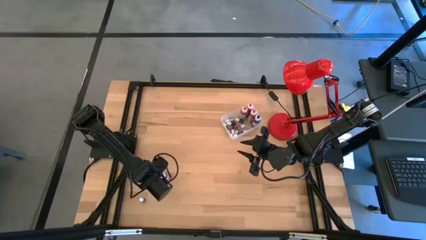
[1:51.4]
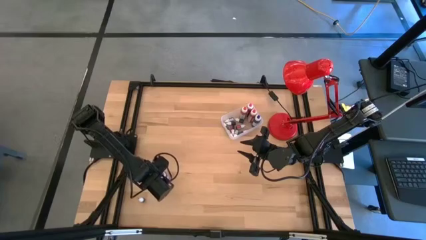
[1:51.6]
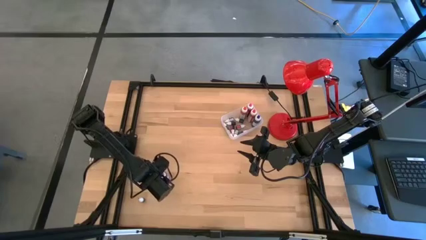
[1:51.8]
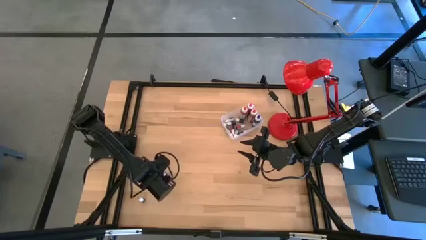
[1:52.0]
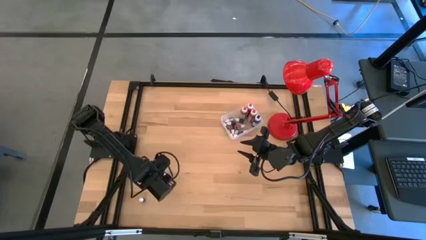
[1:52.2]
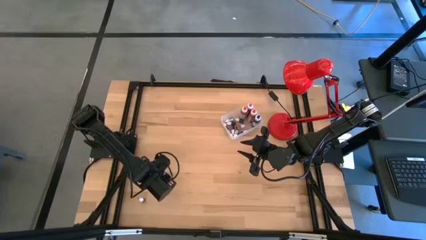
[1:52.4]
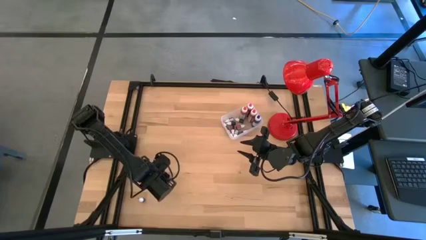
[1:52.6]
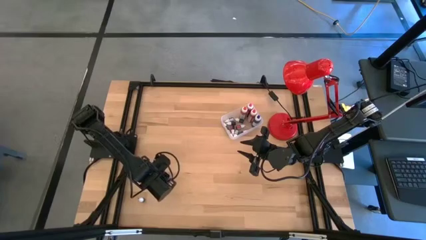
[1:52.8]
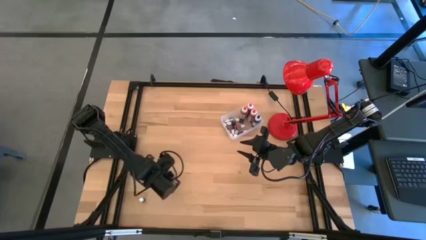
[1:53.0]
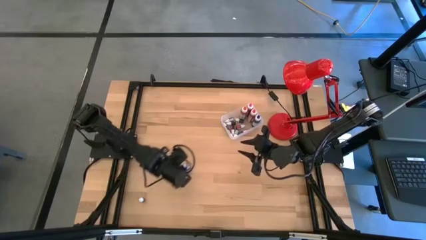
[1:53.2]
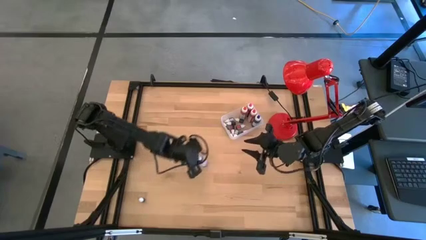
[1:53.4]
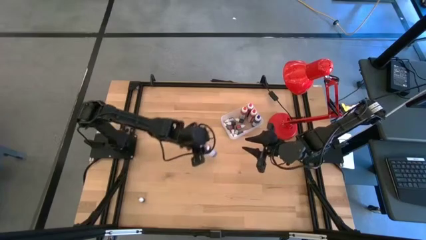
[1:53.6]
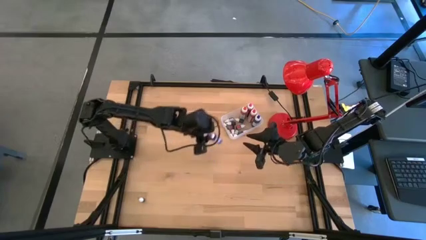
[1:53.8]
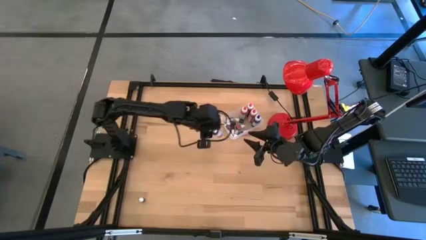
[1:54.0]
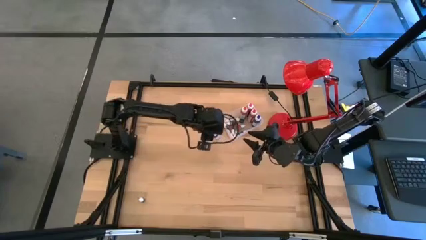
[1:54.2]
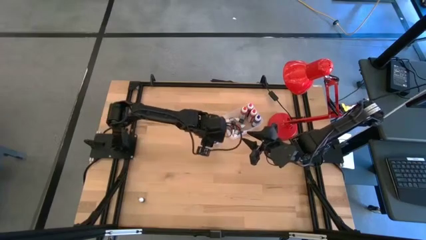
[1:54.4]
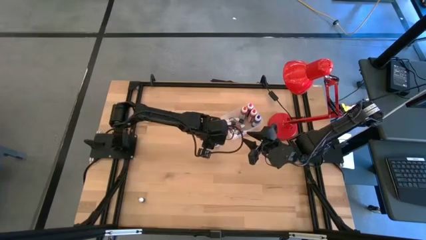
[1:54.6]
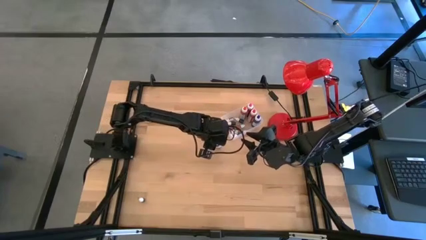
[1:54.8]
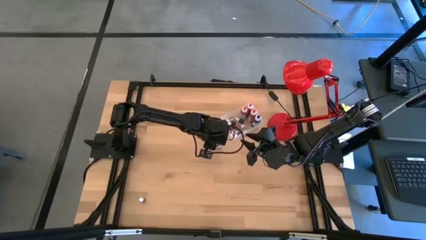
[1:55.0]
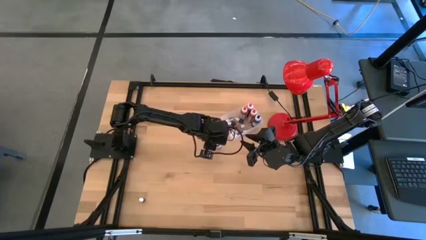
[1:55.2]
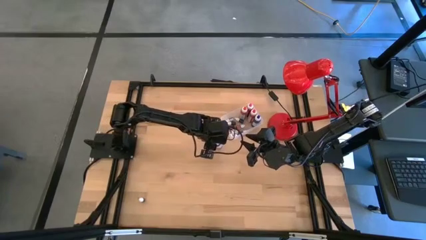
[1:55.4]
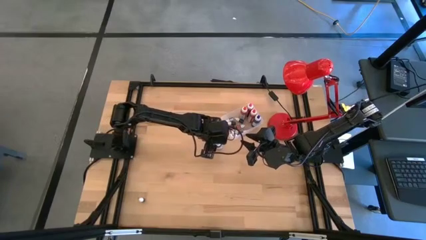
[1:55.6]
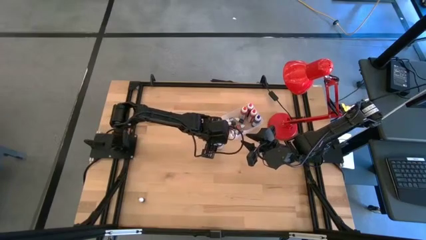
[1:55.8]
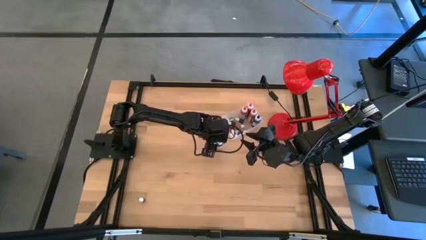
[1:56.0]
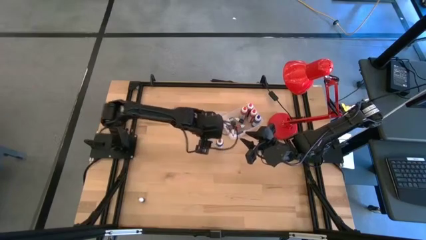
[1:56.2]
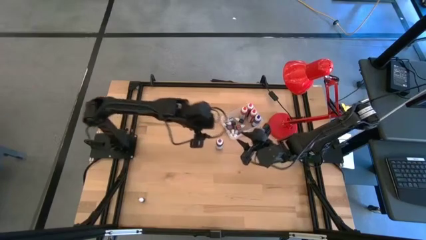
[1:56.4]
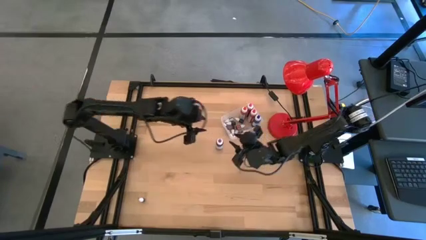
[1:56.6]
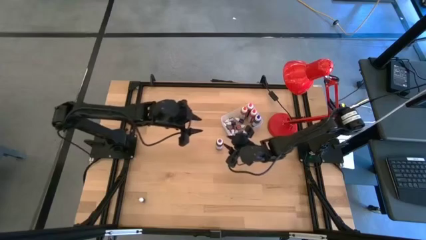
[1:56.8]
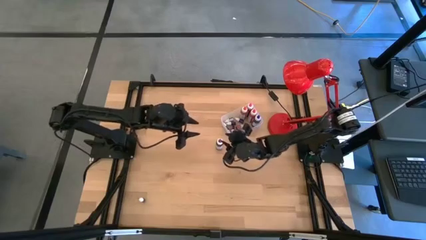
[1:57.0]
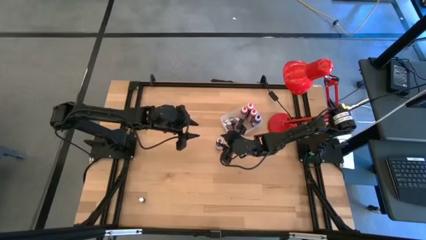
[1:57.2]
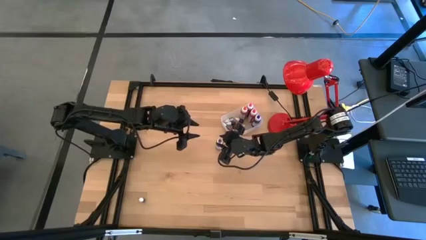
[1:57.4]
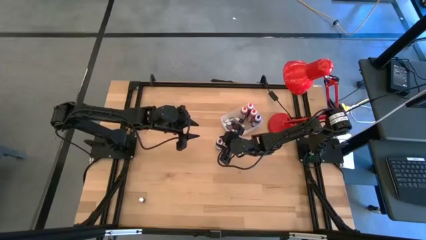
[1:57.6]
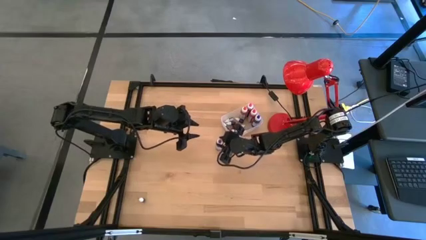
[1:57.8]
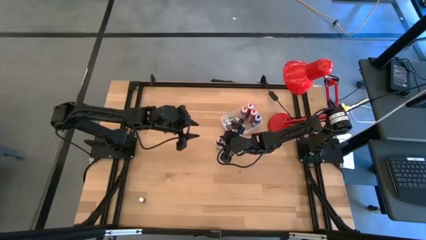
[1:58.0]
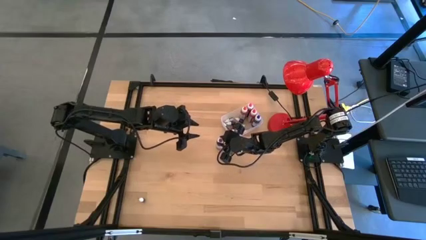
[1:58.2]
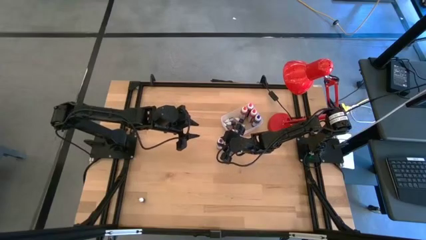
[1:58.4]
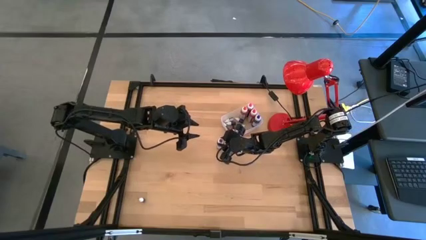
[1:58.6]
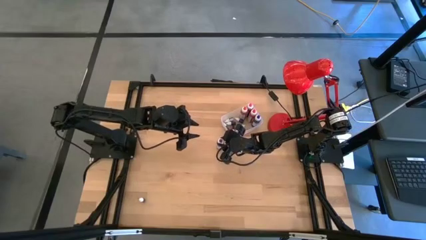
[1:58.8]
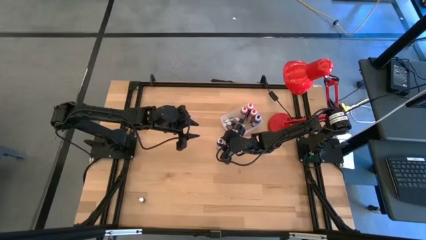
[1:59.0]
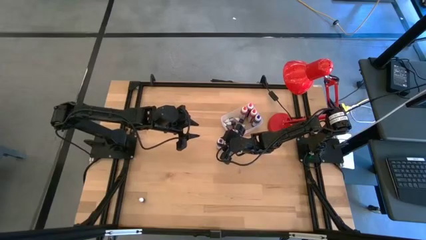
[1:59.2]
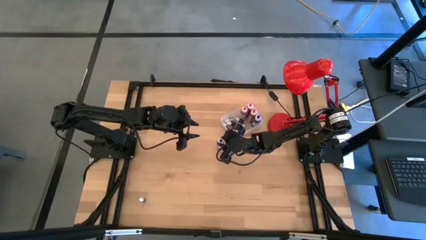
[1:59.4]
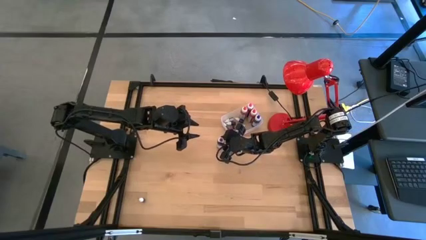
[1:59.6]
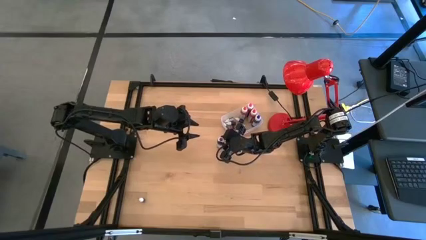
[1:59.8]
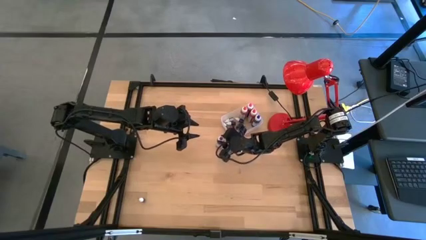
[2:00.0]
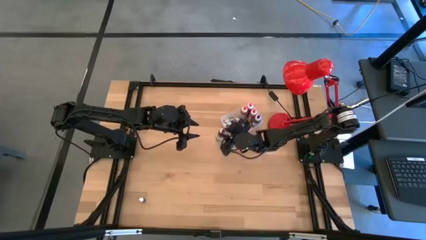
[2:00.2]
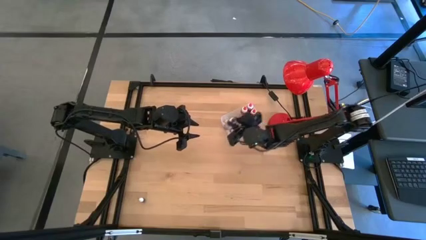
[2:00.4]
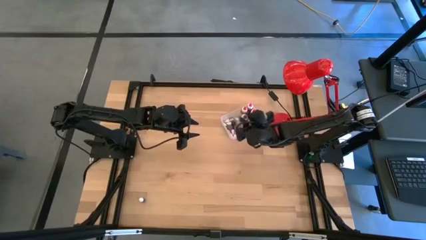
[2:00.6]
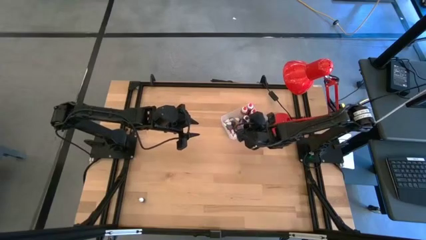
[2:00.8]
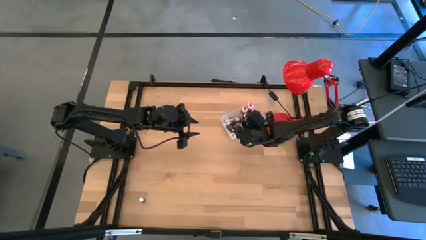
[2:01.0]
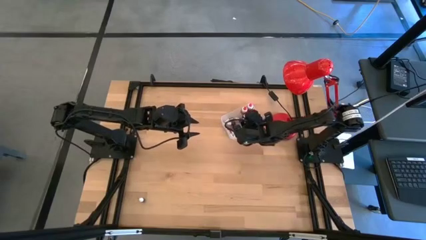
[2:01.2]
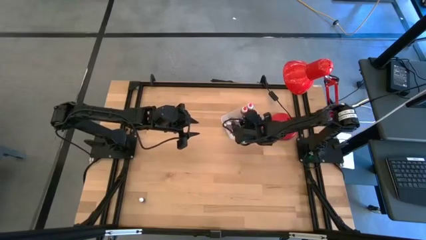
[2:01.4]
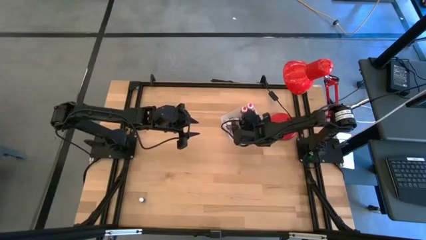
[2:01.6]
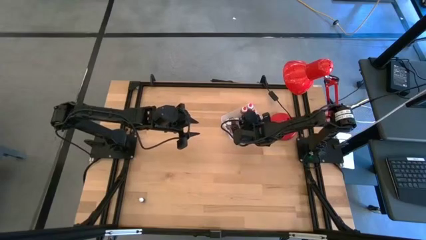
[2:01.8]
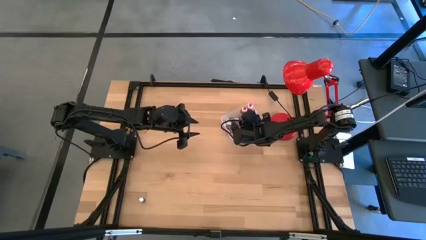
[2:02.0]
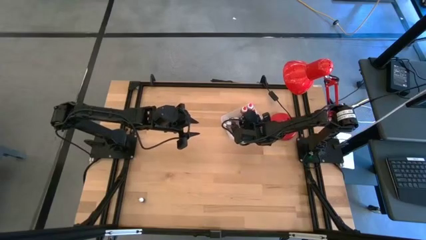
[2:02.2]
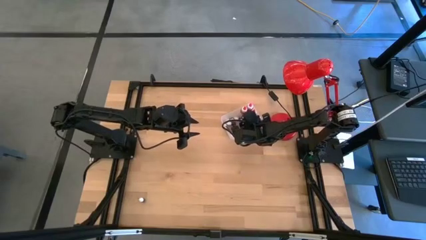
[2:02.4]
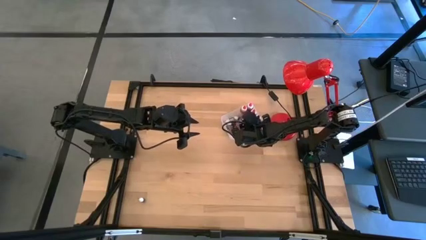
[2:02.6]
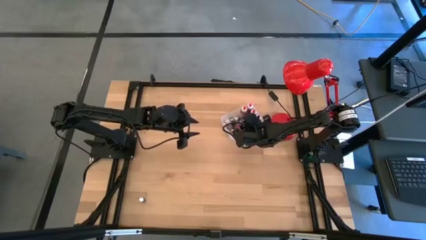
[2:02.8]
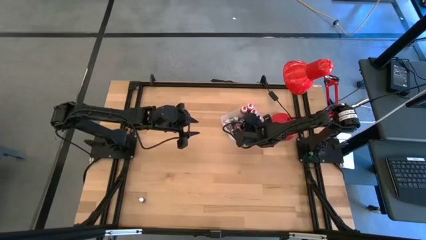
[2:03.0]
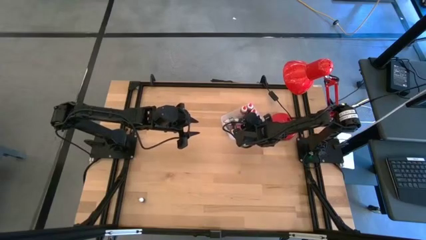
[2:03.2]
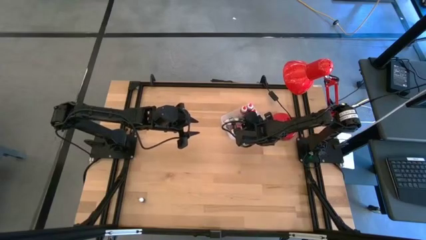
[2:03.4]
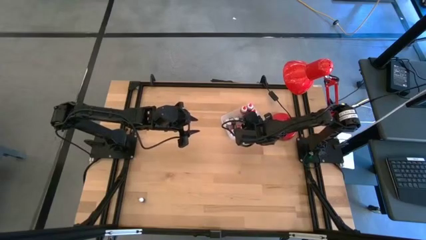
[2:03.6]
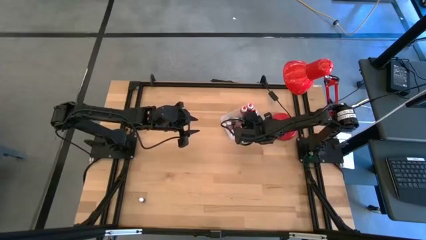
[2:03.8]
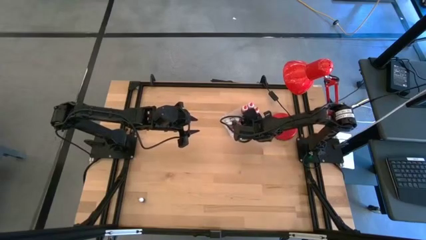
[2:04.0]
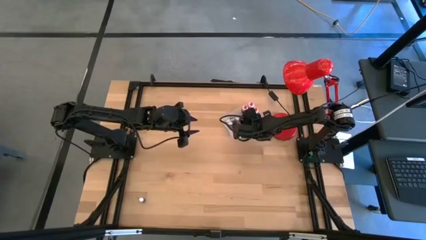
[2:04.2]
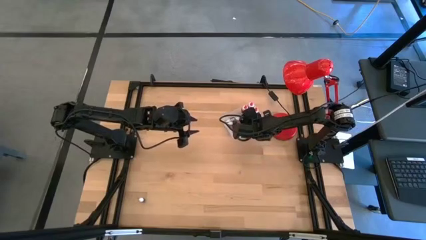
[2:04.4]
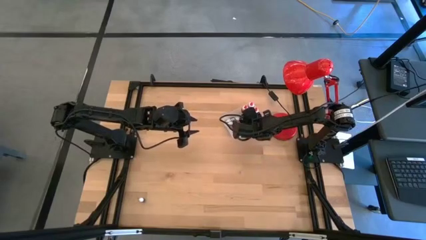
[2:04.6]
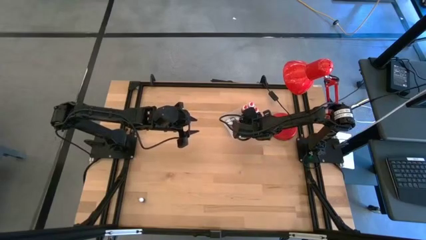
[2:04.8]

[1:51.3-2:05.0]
Task: Pick & Place food coloring
Put the big purple food coloring bottle in the transparent bin

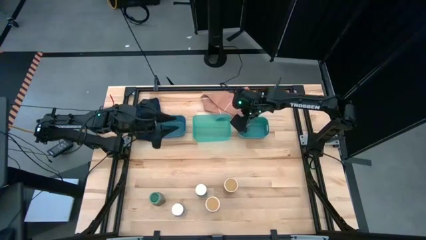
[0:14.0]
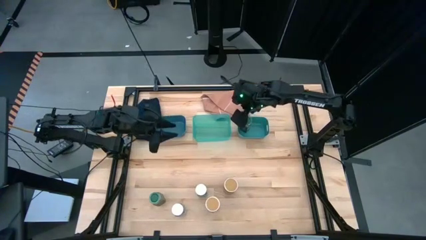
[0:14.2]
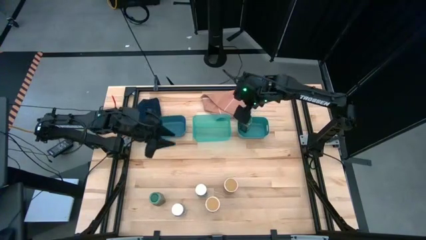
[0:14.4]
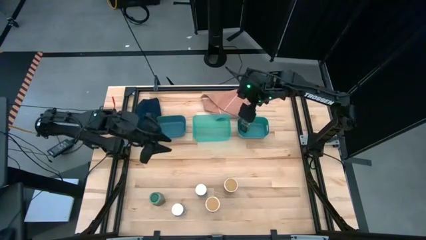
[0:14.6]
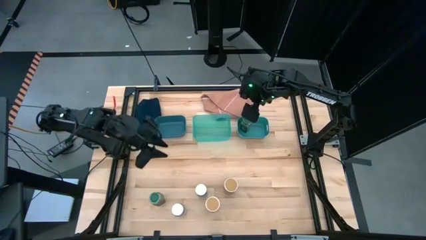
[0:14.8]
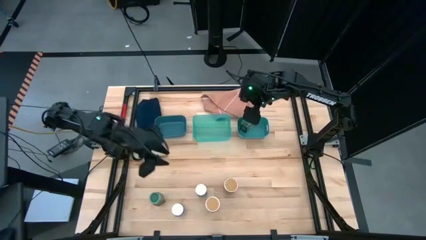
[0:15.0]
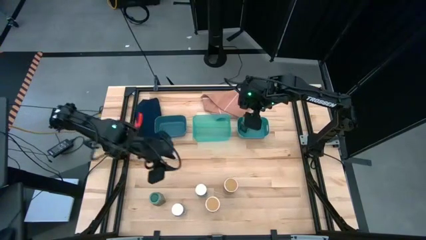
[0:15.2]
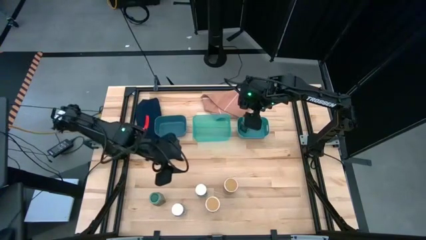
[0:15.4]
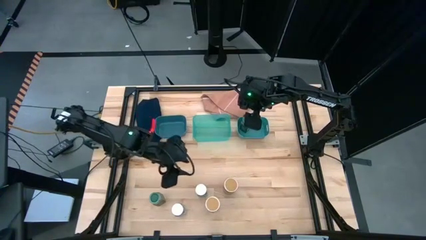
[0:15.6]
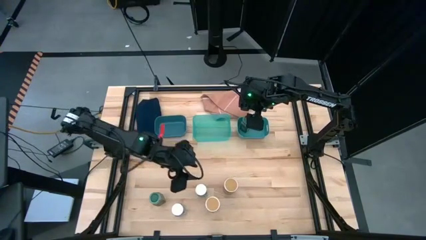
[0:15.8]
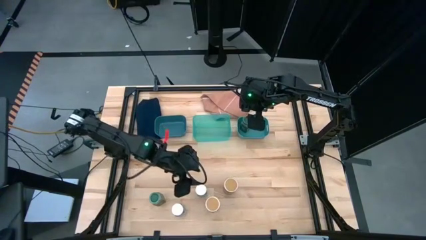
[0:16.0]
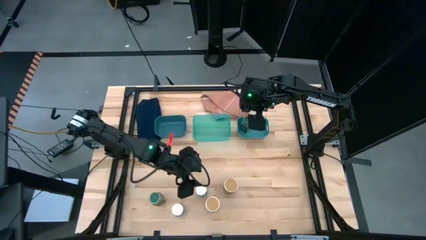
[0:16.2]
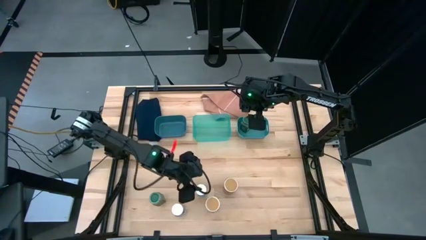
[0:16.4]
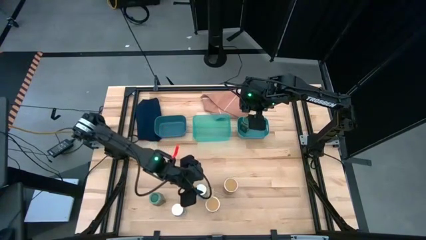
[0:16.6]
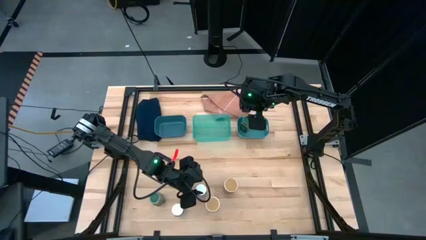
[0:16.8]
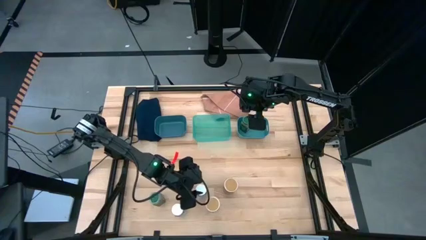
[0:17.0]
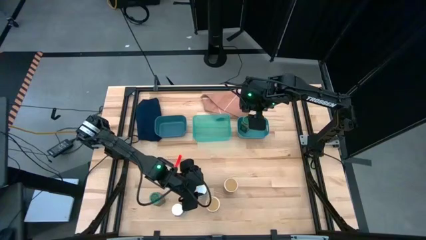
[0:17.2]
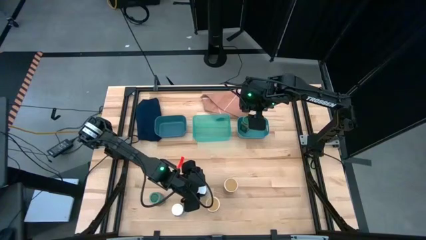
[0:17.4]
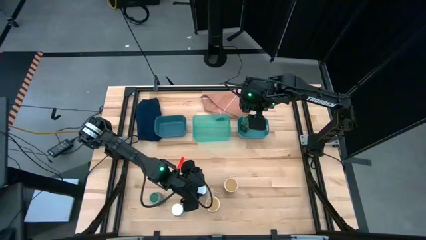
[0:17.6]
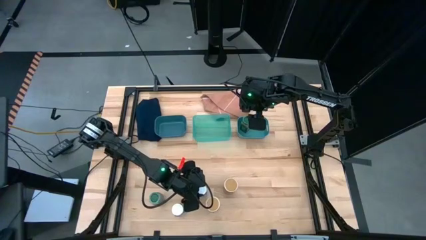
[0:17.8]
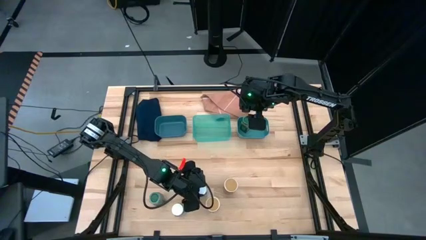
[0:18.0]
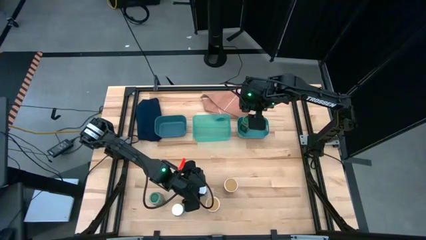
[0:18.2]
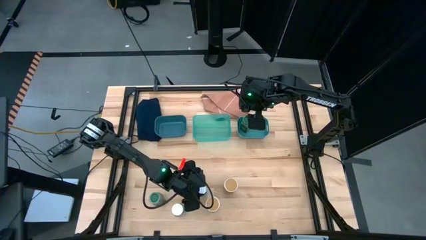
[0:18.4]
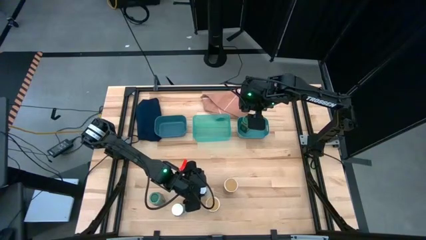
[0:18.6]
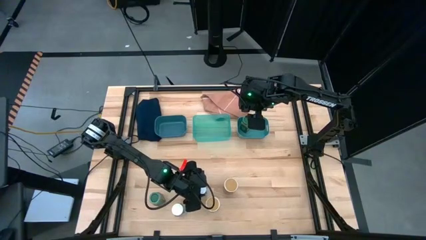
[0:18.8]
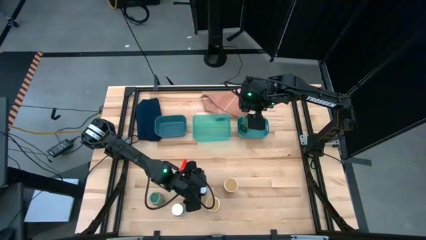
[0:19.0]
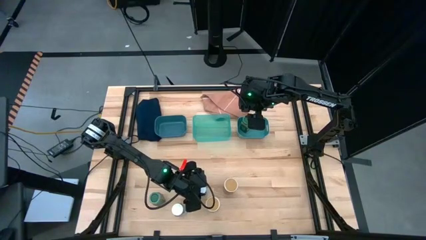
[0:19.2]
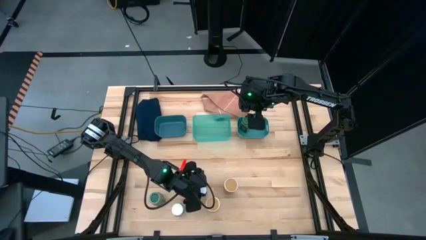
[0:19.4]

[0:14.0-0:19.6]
Task: Sort spices by type
Put the top white seasoning bottle into the transparent green bin
